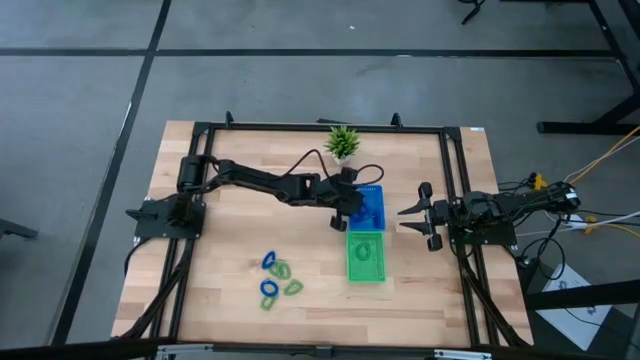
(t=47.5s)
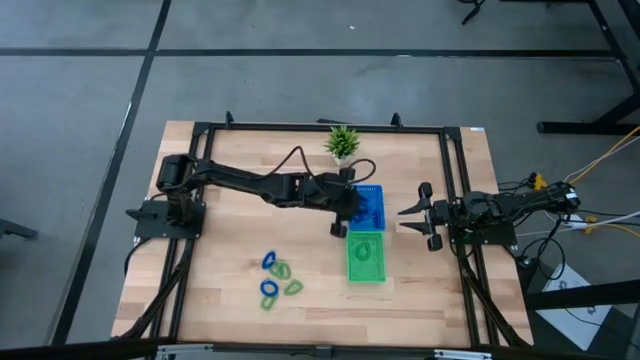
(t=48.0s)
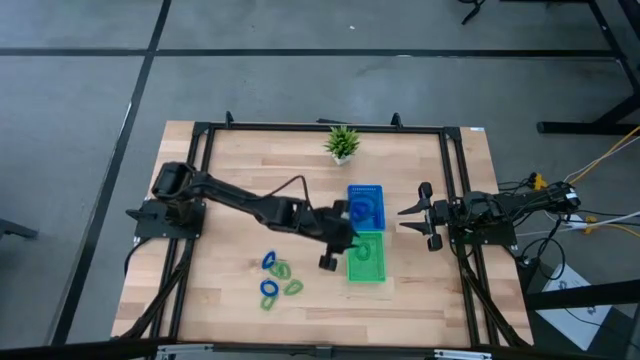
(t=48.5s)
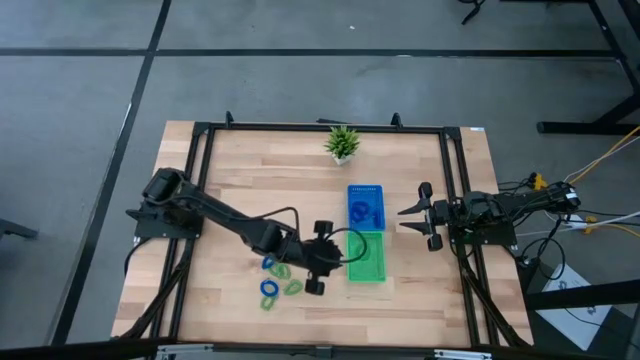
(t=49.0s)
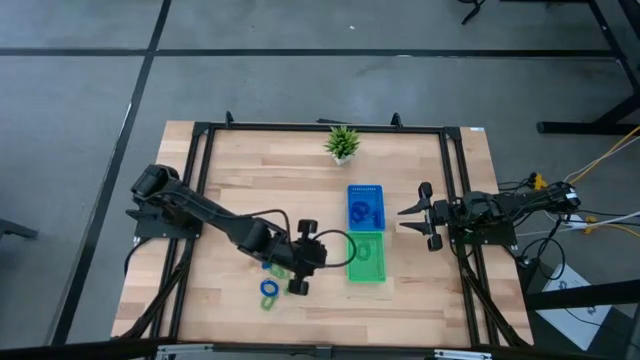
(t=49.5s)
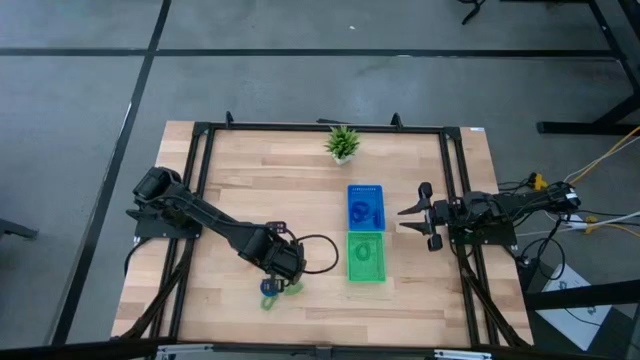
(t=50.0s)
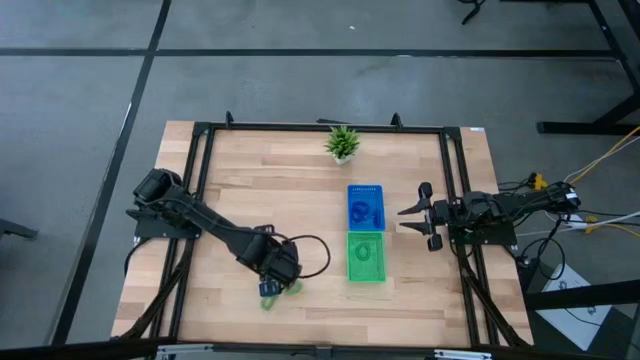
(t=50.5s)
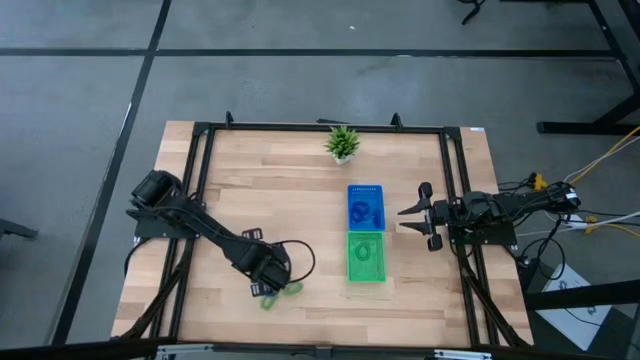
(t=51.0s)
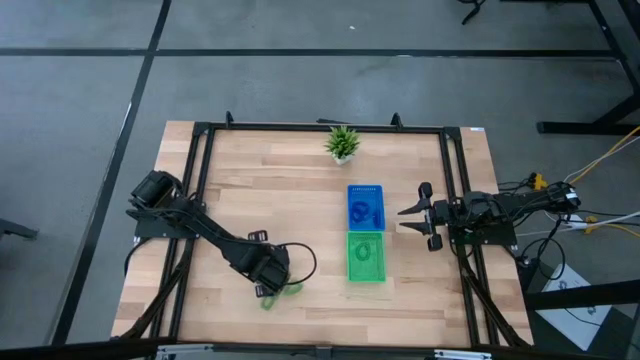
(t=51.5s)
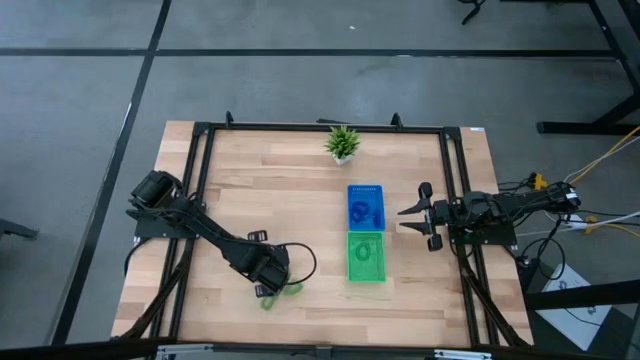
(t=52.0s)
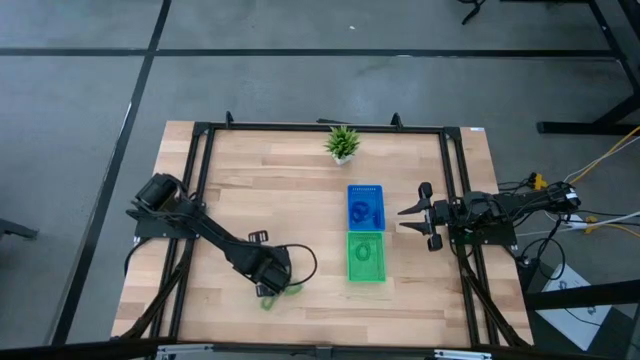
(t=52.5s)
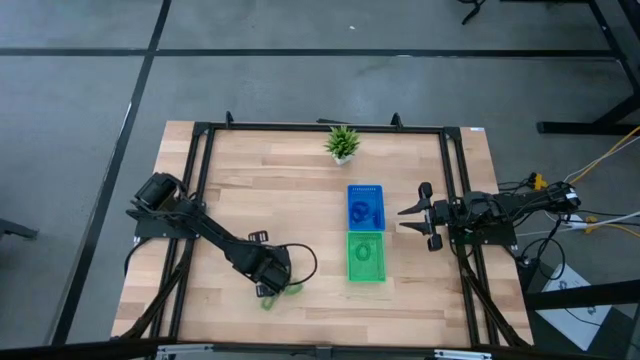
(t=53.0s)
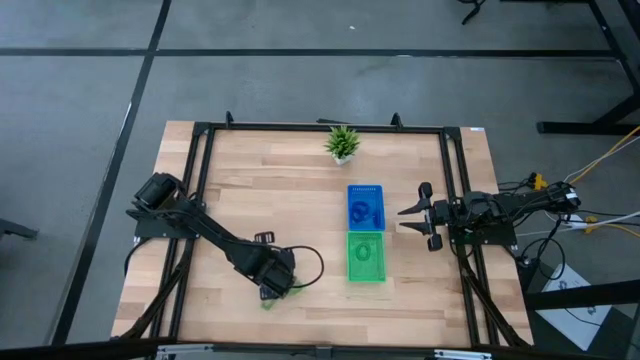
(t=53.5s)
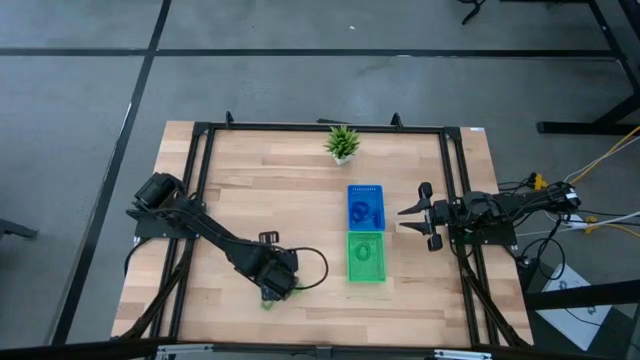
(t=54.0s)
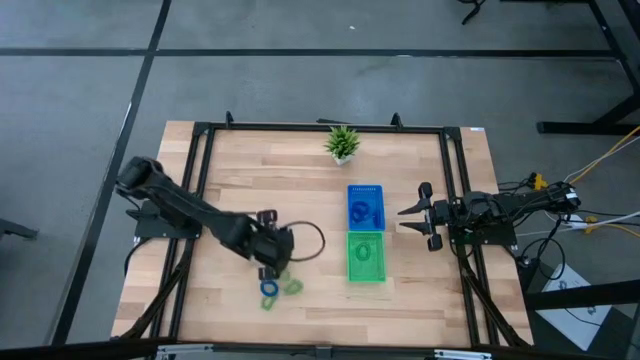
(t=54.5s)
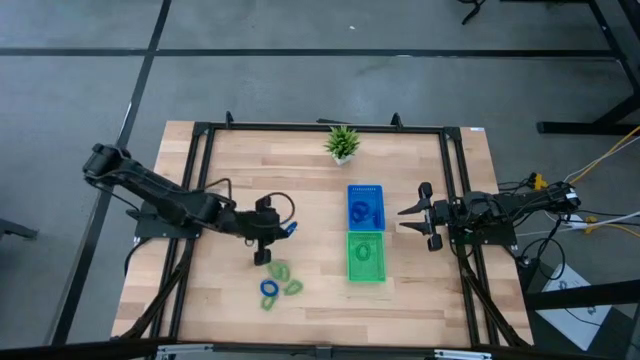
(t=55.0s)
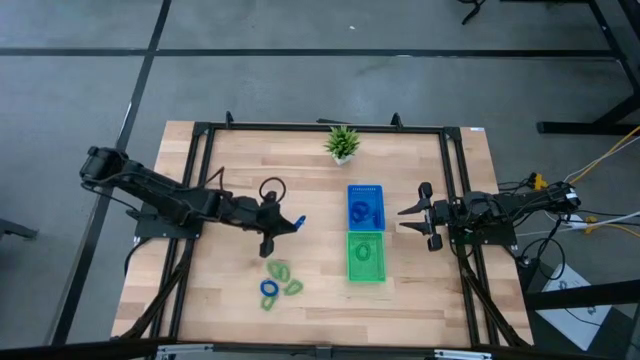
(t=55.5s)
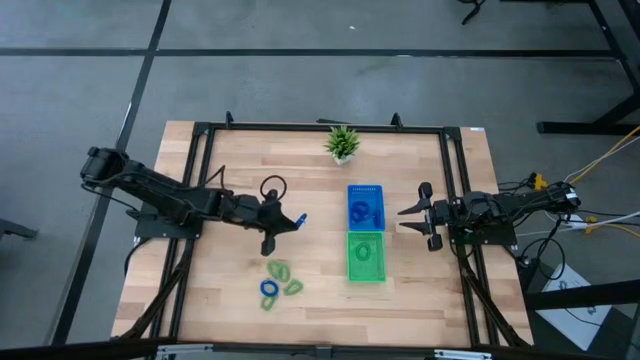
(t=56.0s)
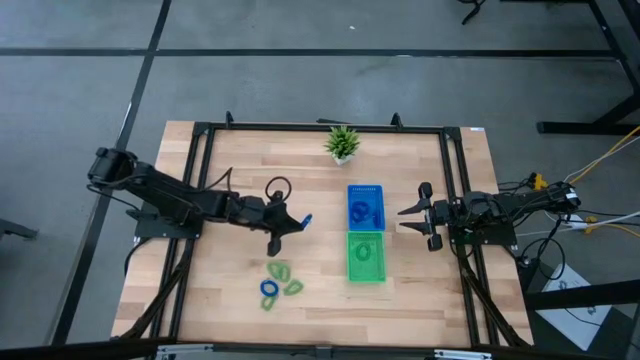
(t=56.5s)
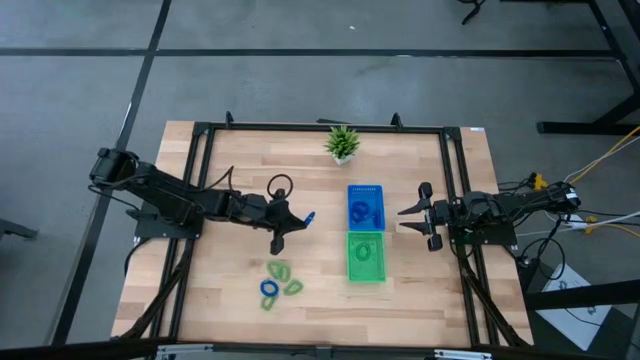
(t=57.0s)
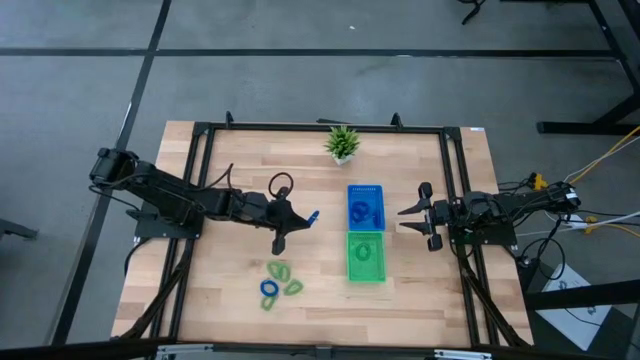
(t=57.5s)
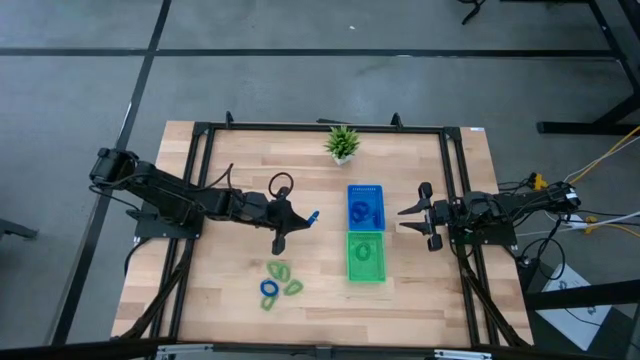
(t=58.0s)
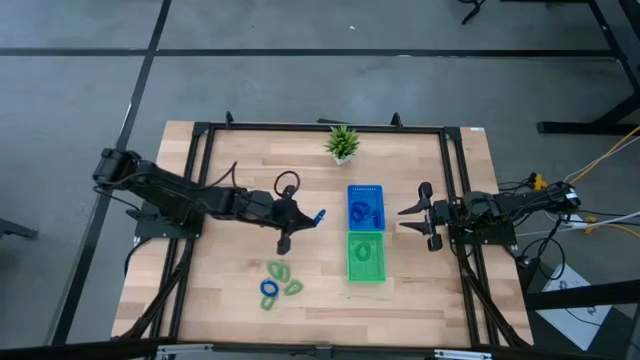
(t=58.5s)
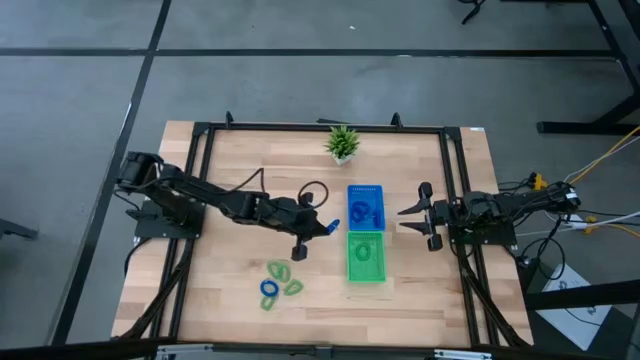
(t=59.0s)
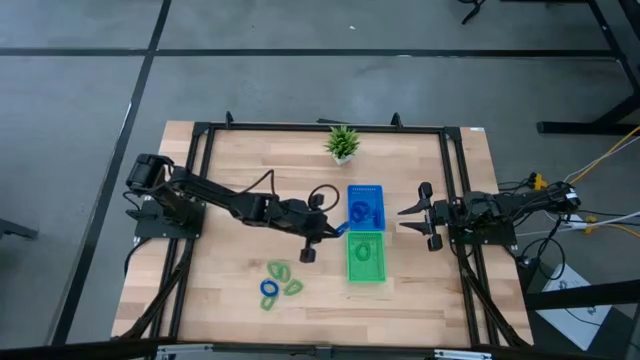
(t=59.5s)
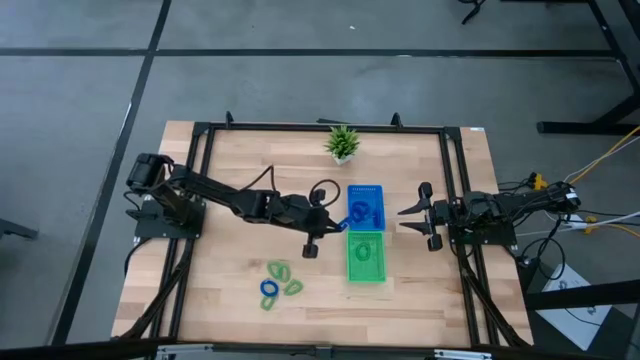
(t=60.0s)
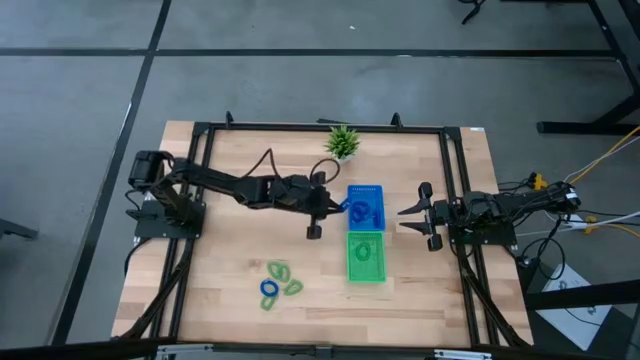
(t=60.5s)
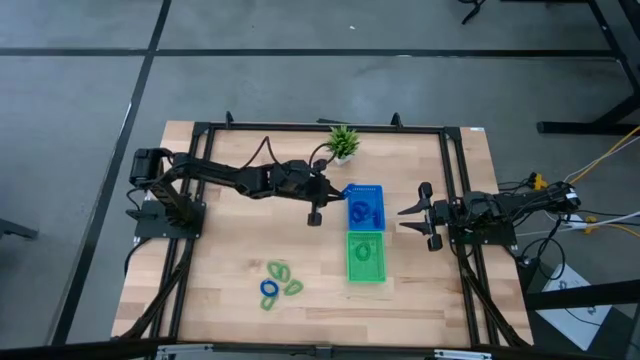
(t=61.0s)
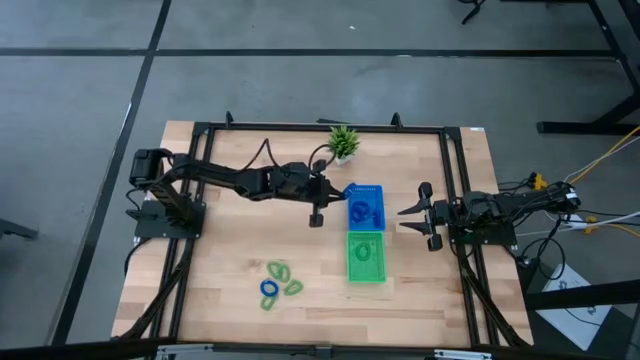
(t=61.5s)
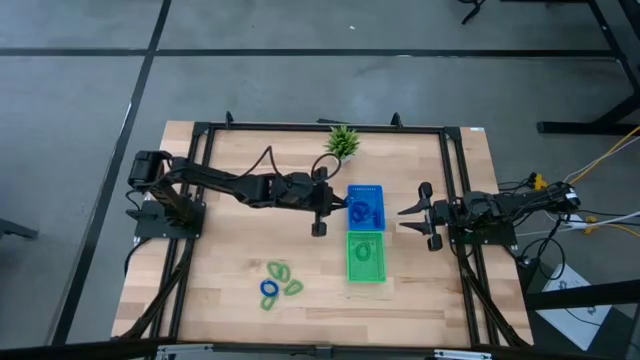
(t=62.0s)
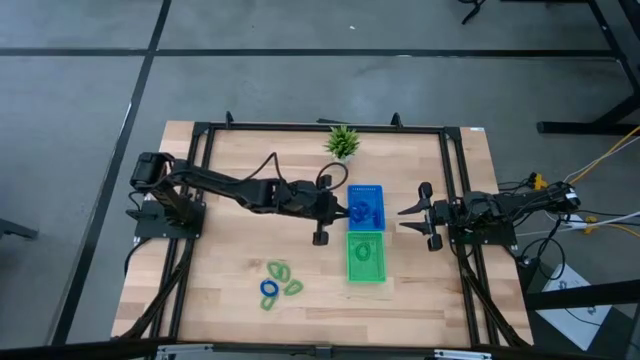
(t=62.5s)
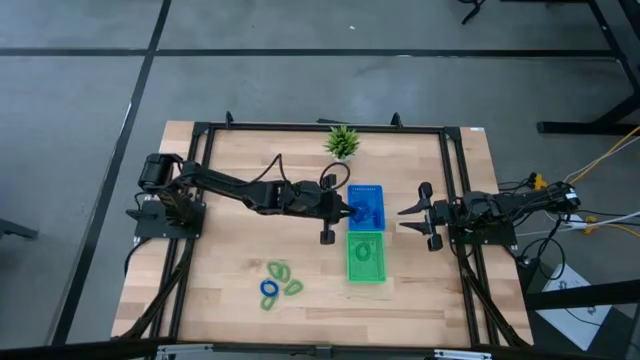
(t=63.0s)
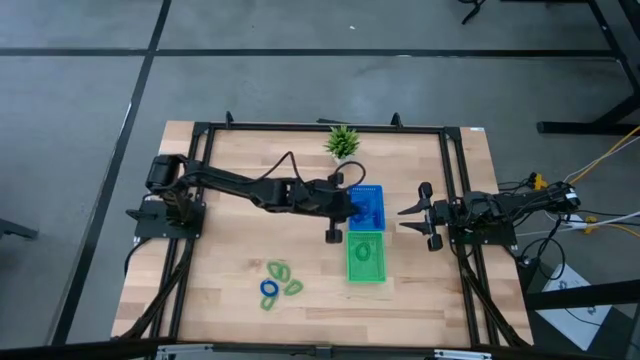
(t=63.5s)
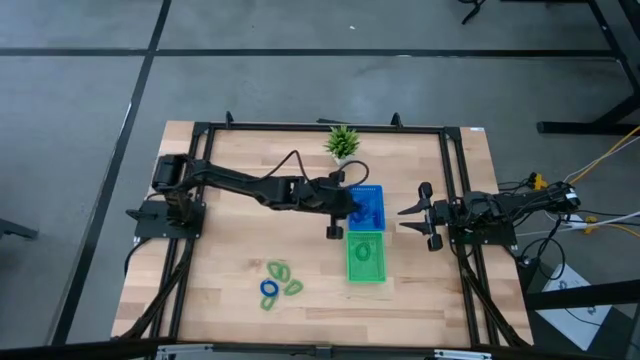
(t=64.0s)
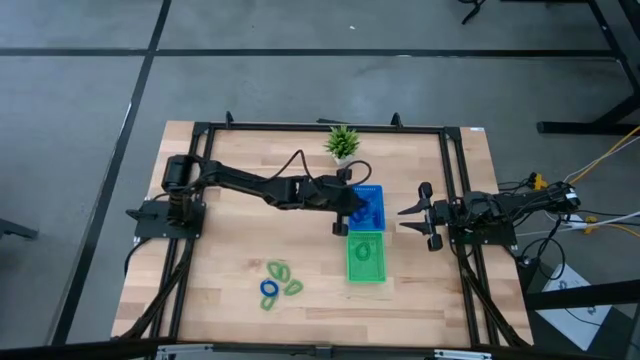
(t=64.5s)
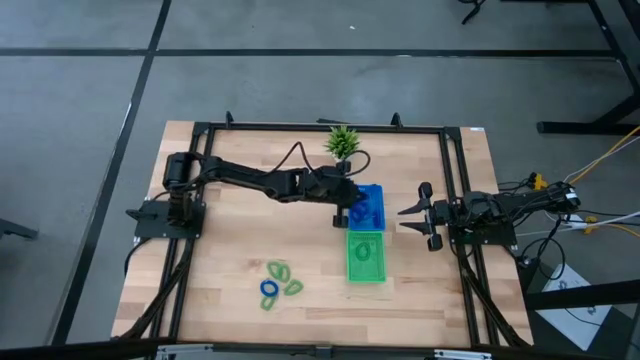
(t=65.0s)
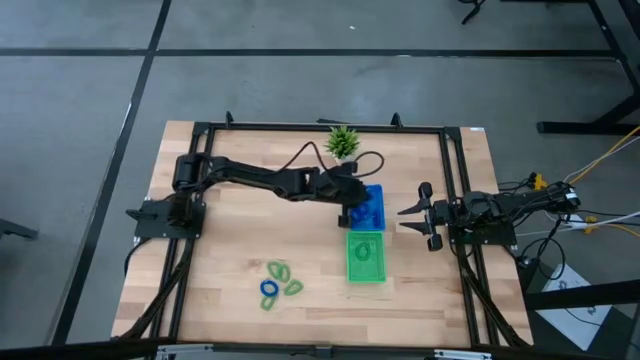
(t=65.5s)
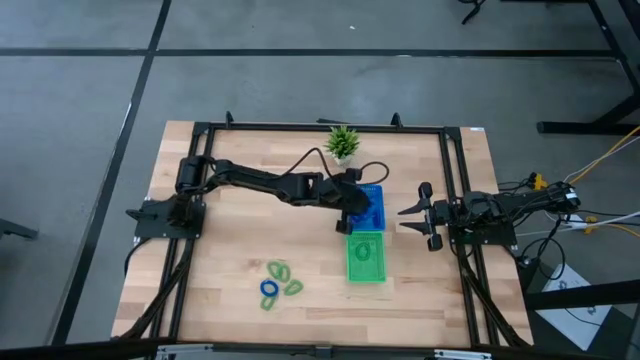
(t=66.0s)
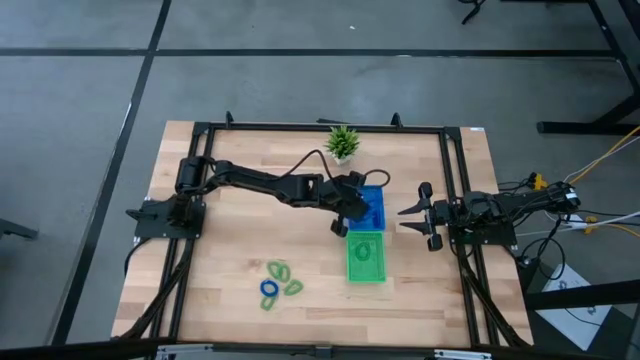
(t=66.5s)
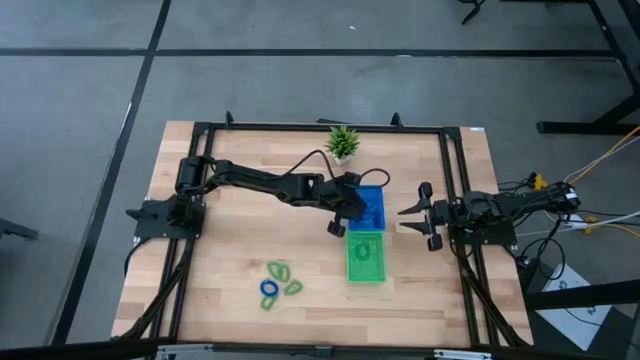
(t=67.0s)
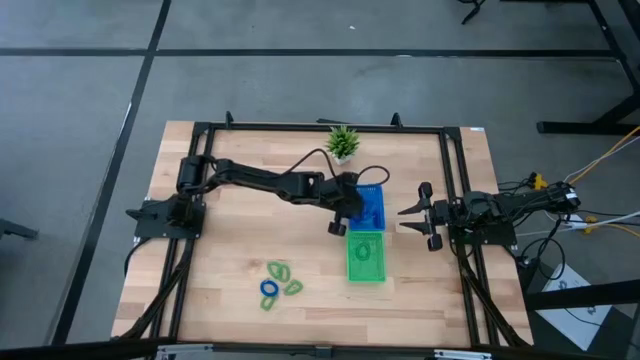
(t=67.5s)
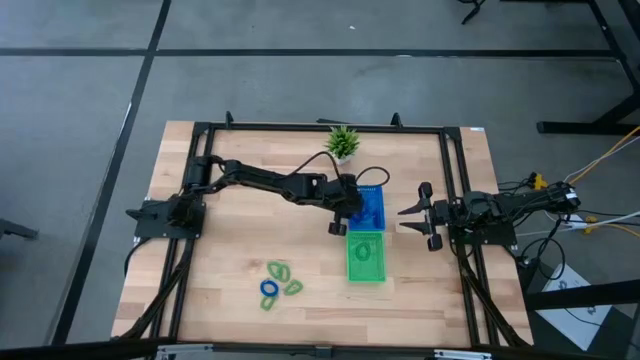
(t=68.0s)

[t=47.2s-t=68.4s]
Task: Sort spring keychains
Put the blue spring keychain into the blue bin

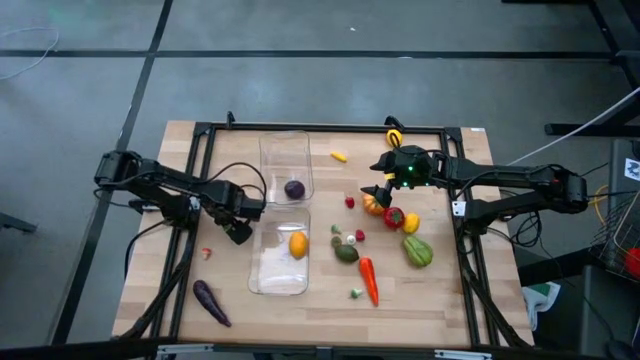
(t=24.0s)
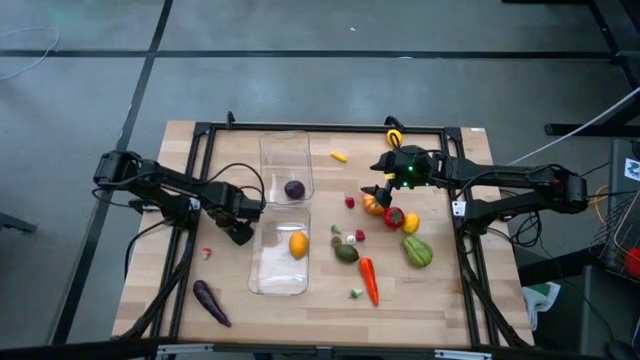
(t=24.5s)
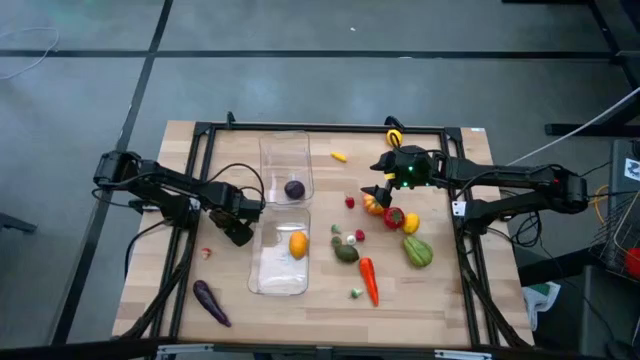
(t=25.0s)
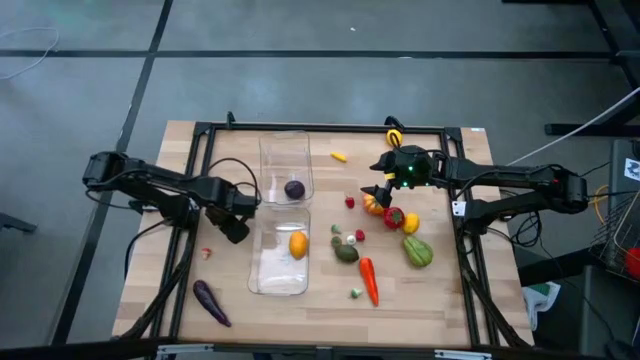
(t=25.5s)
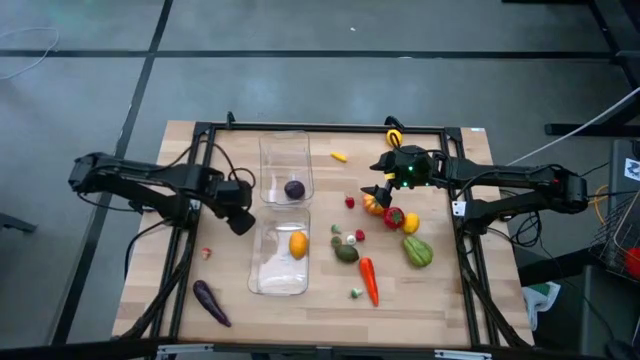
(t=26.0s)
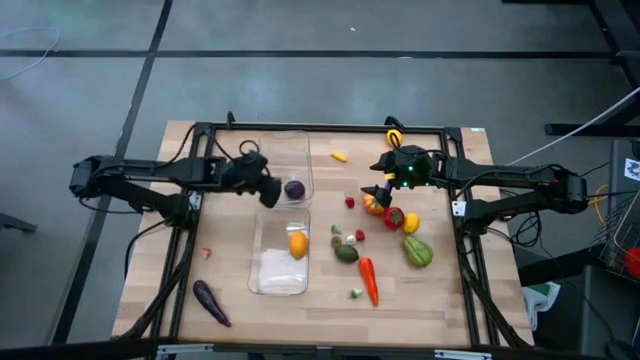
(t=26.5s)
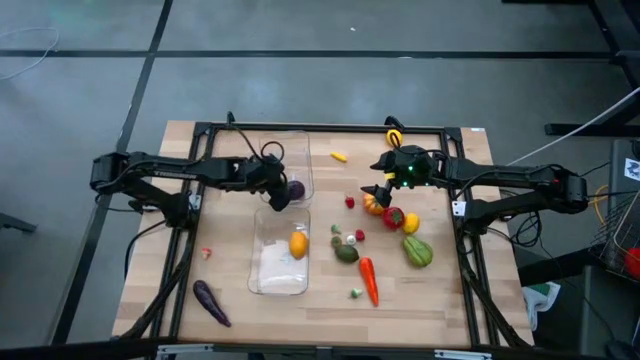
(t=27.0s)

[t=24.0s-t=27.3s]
Task: Sort produce into baskets
Put the green bell pepper into the top transparent bin
